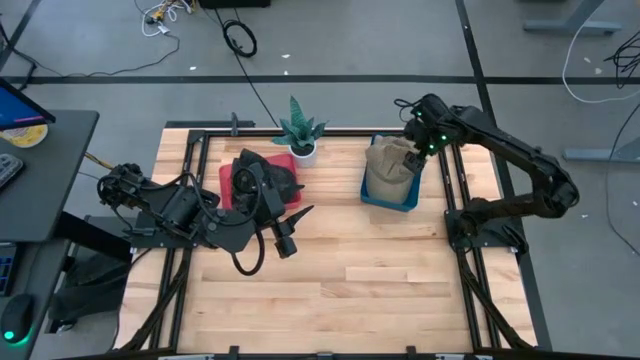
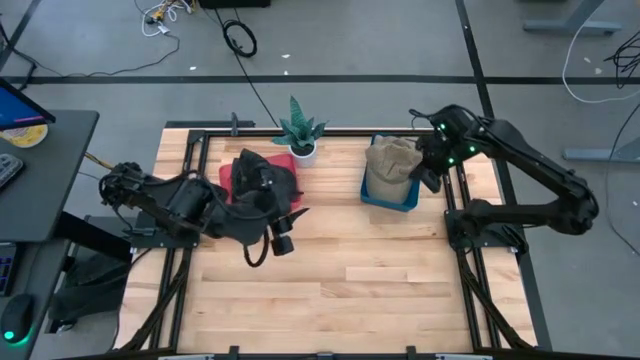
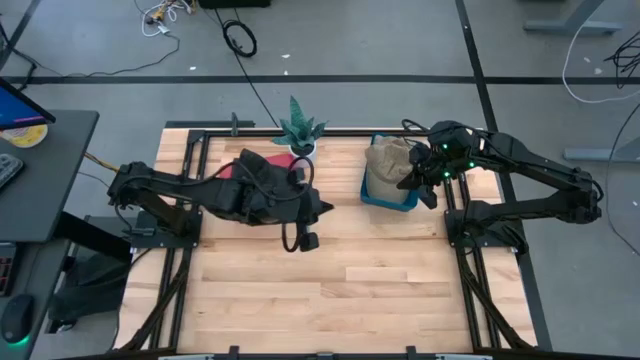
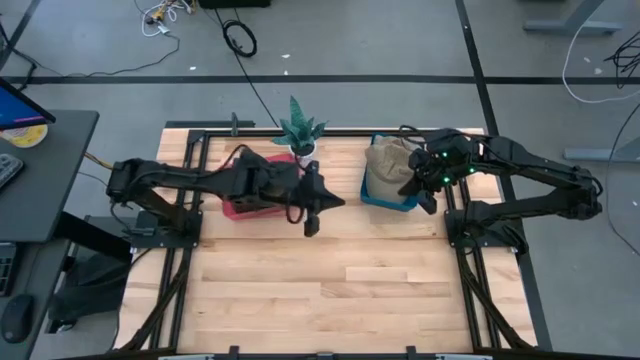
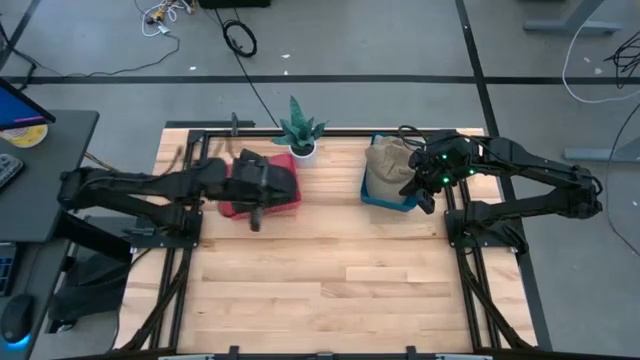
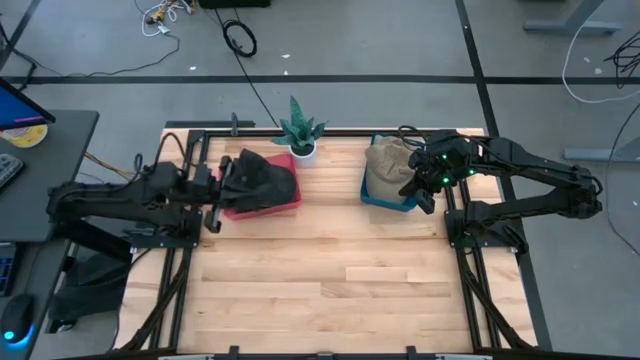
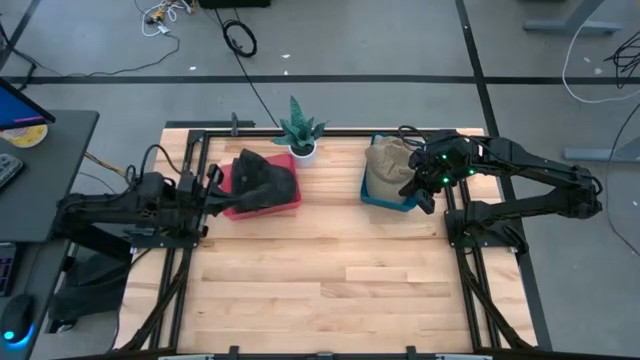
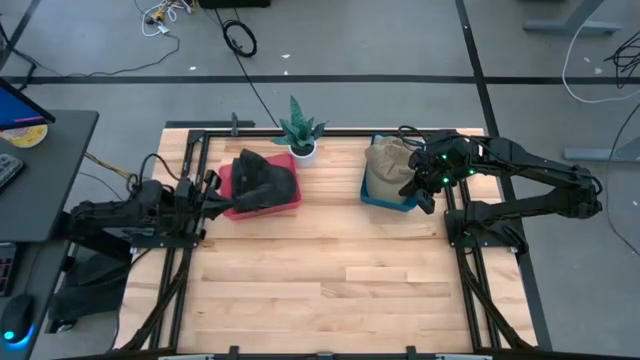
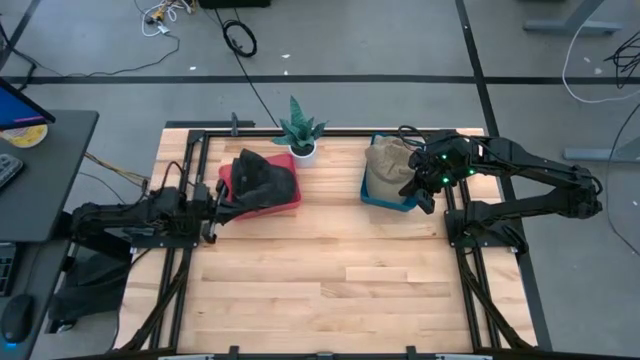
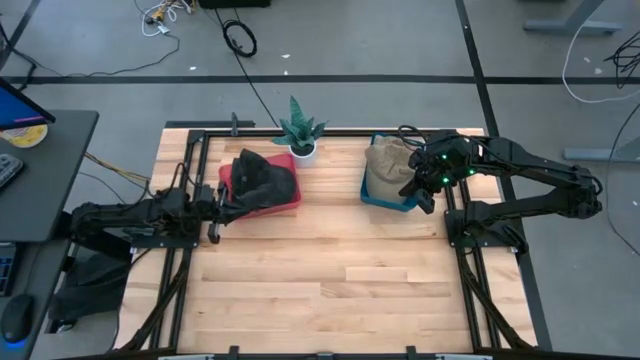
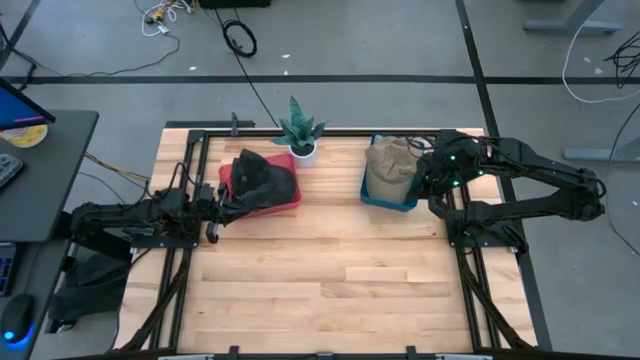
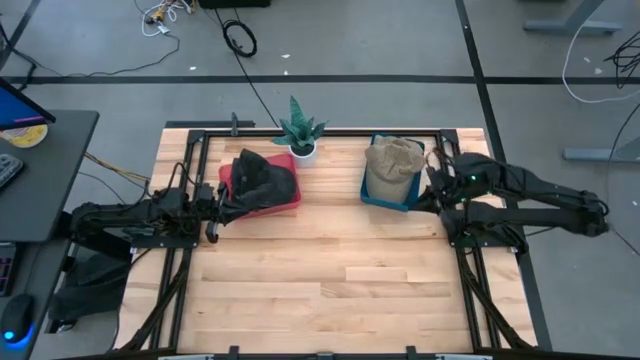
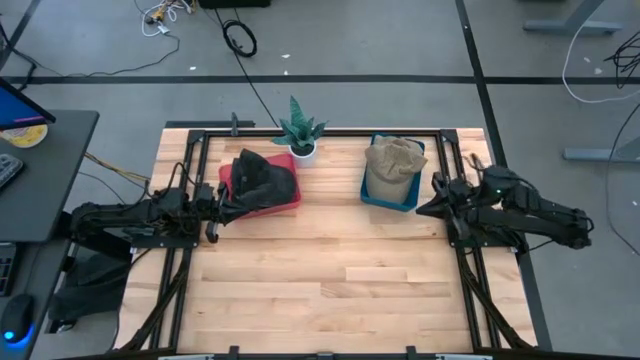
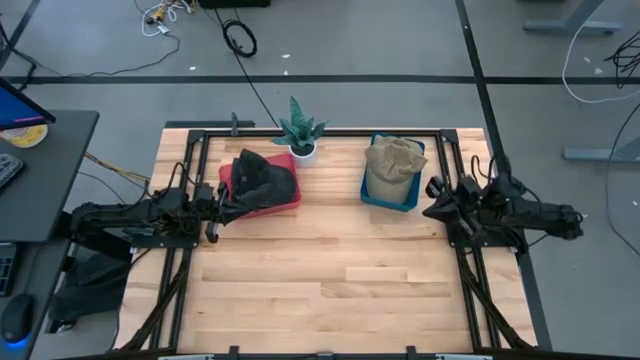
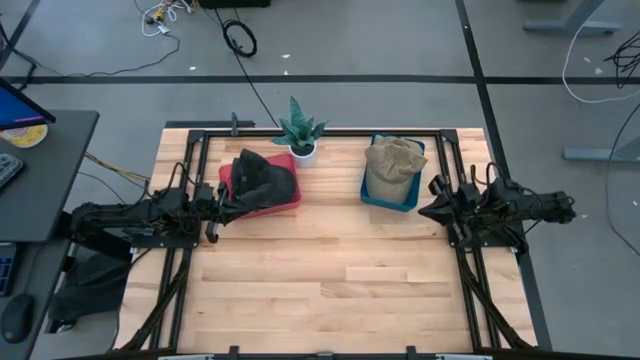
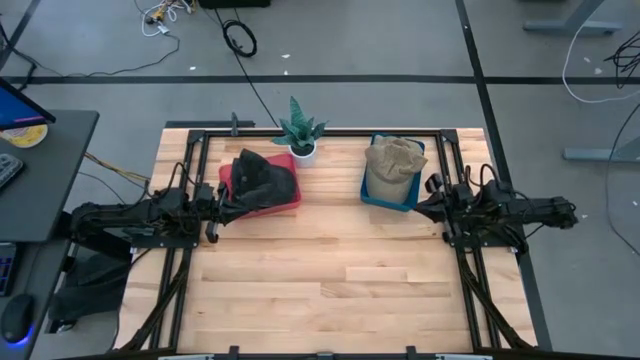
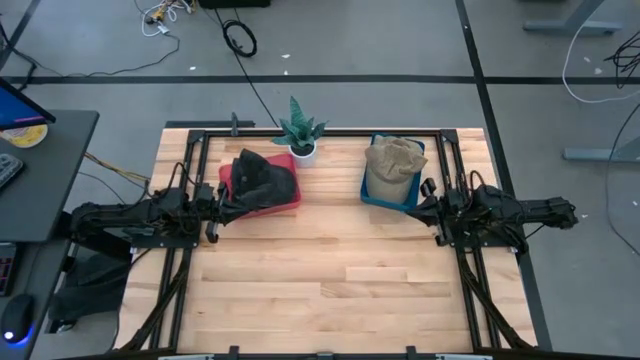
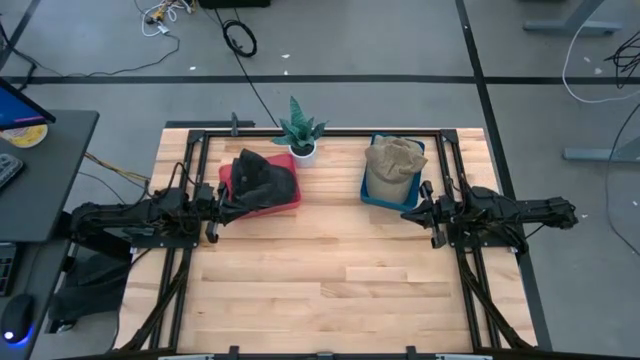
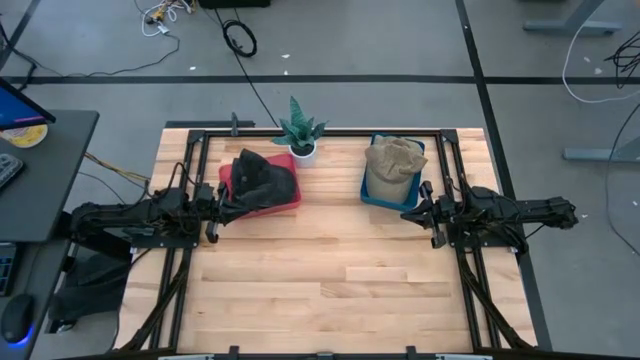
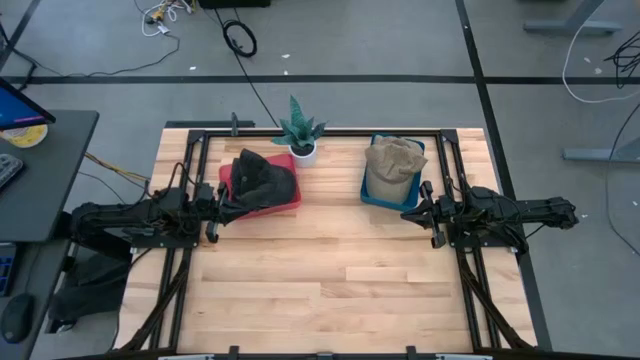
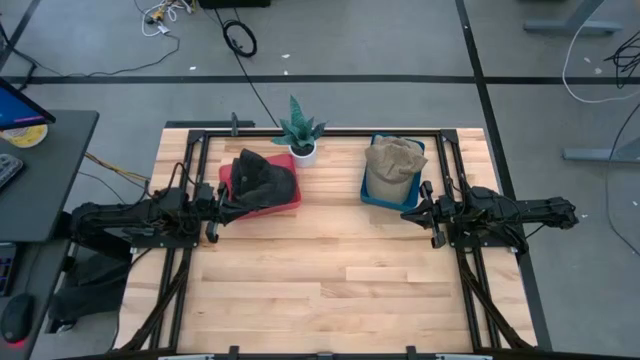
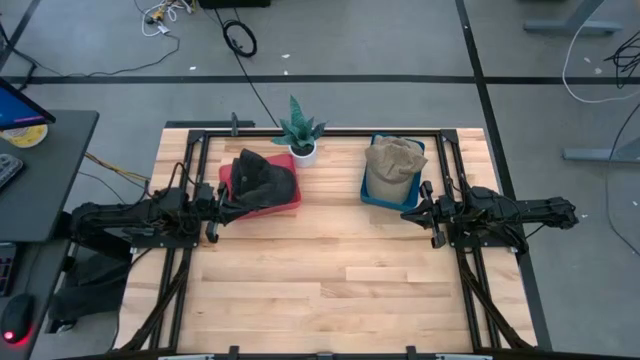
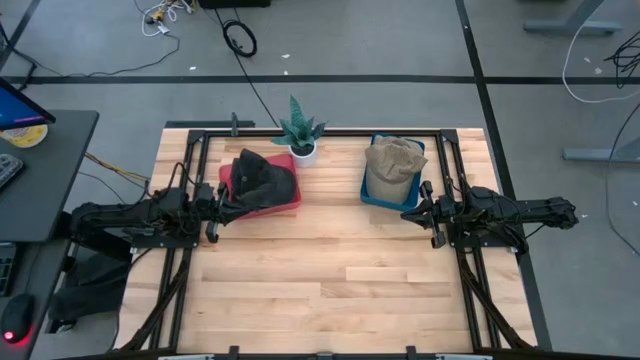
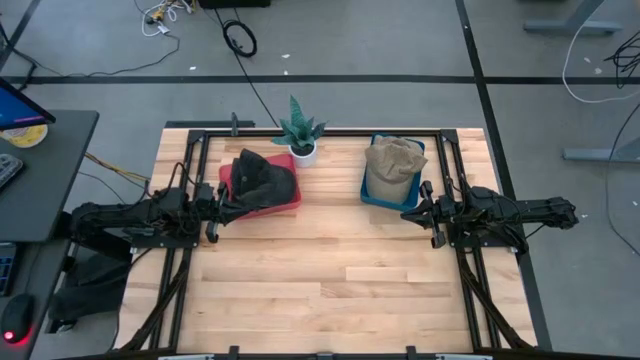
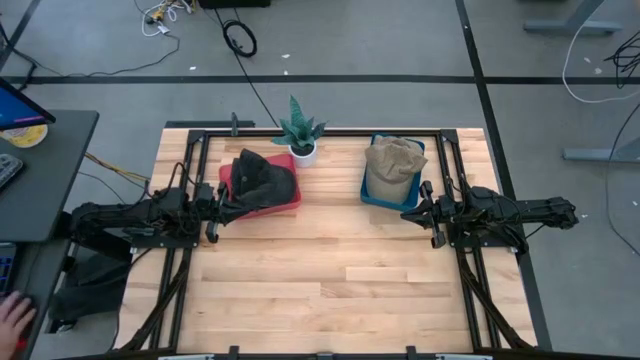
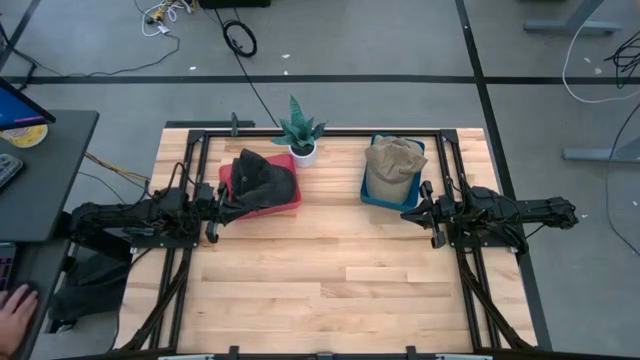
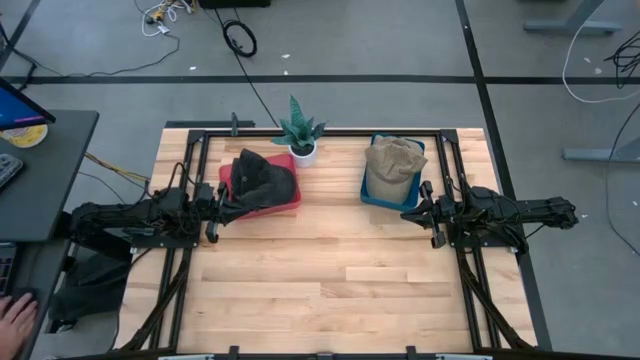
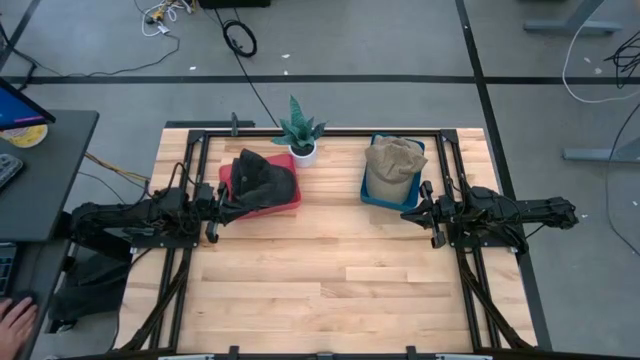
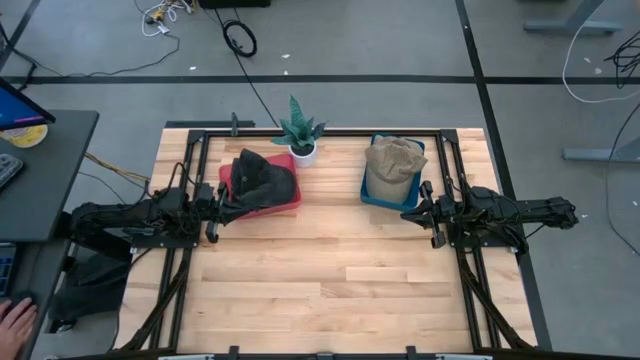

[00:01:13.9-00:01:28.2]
Task: Pick & Place hat
Return to Home Position

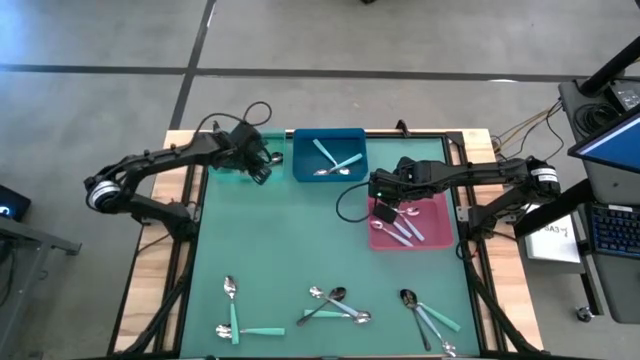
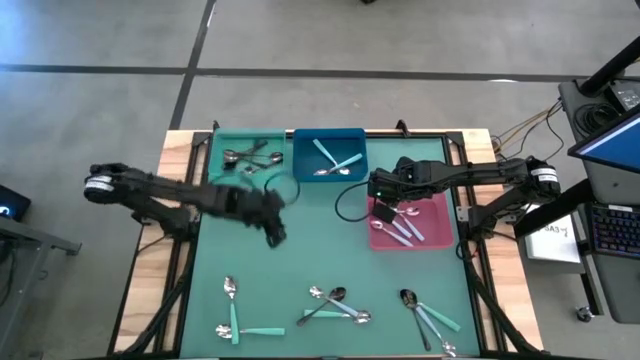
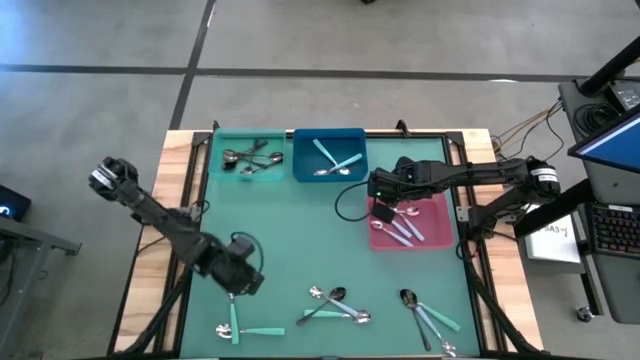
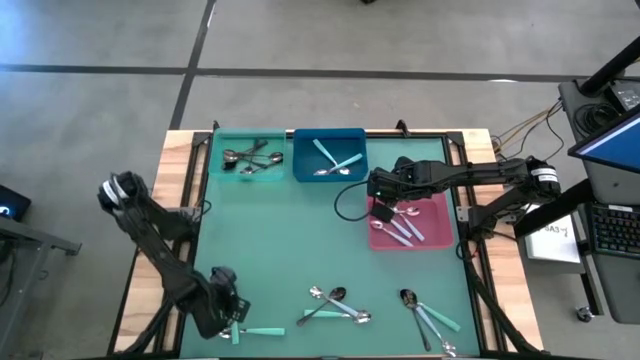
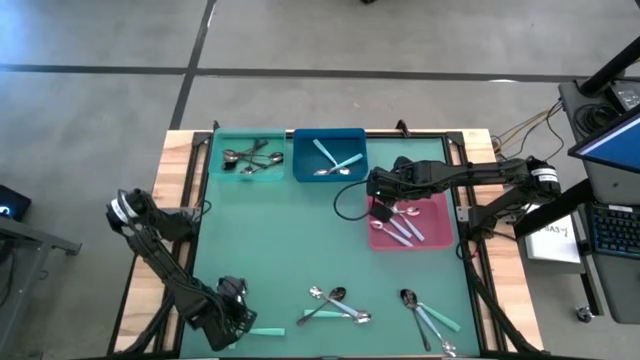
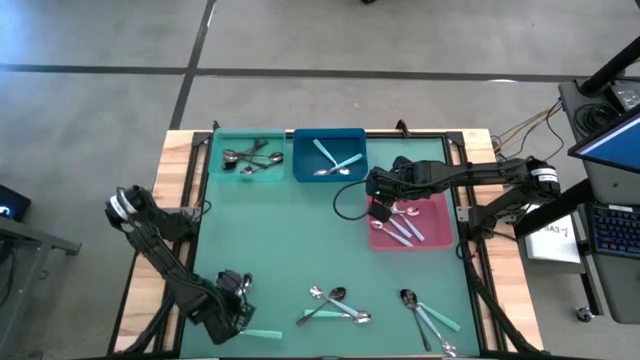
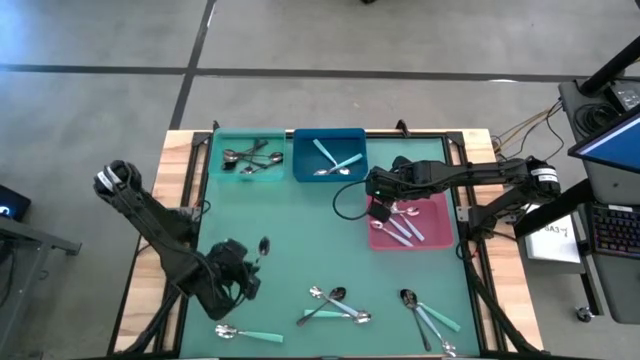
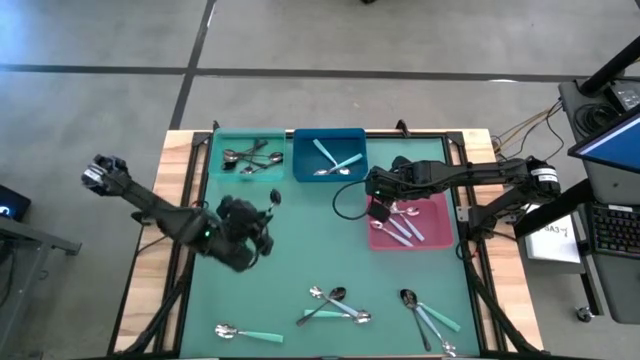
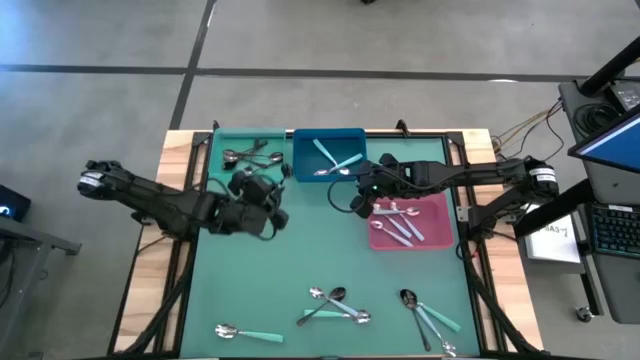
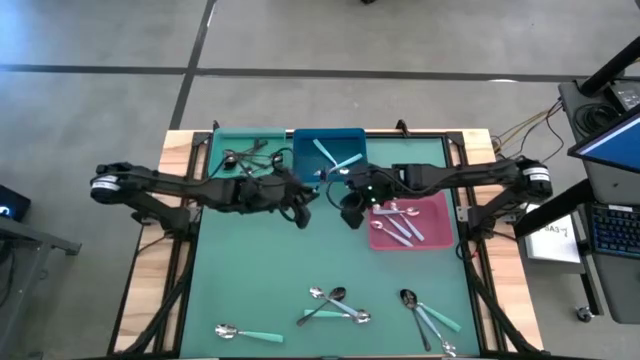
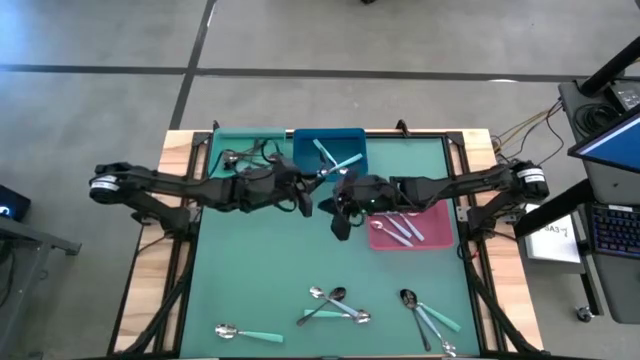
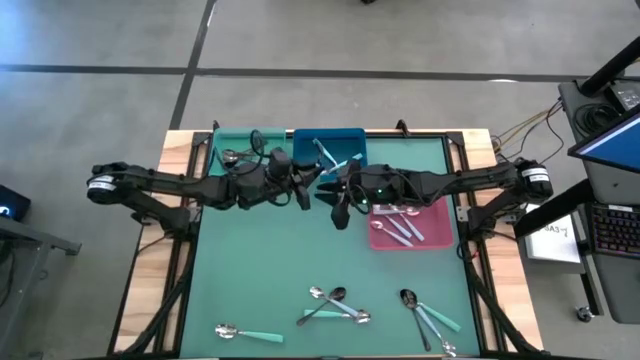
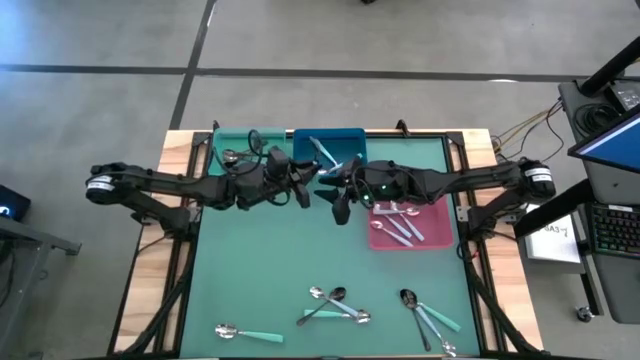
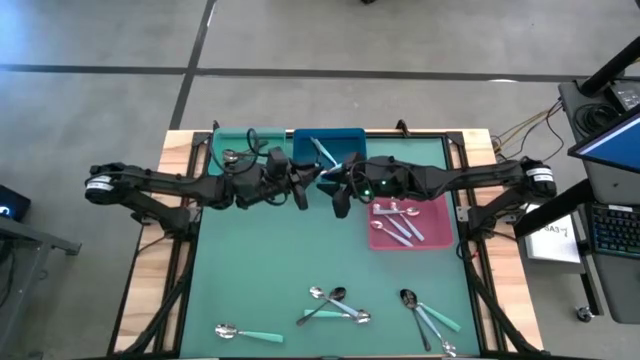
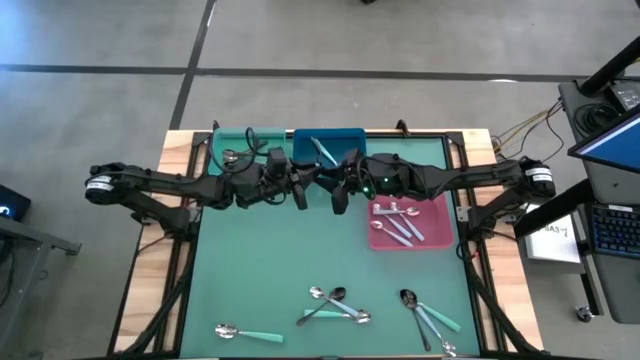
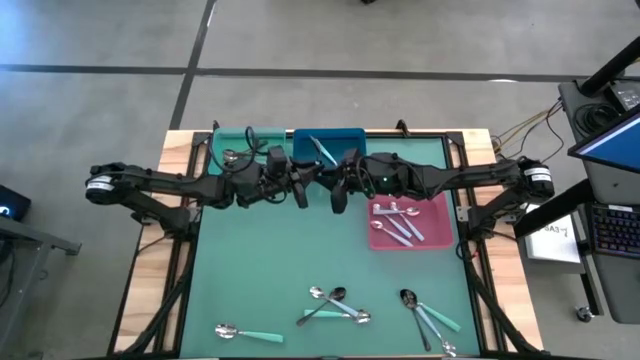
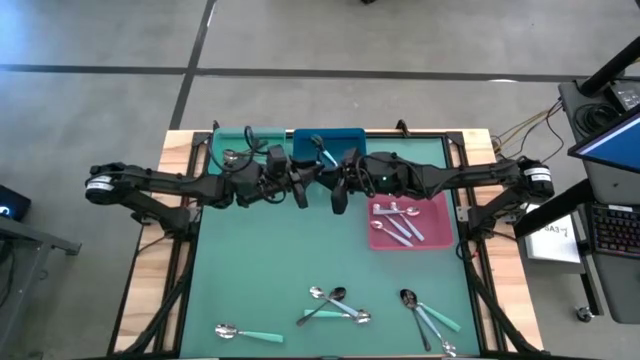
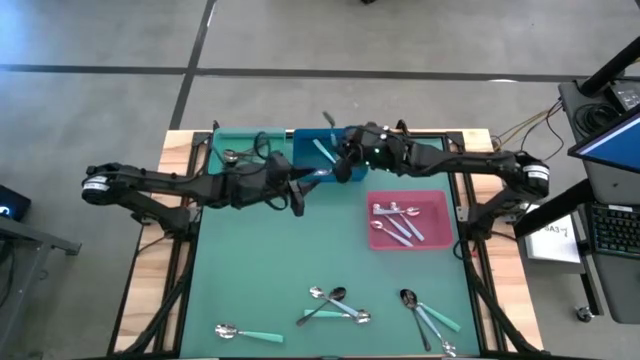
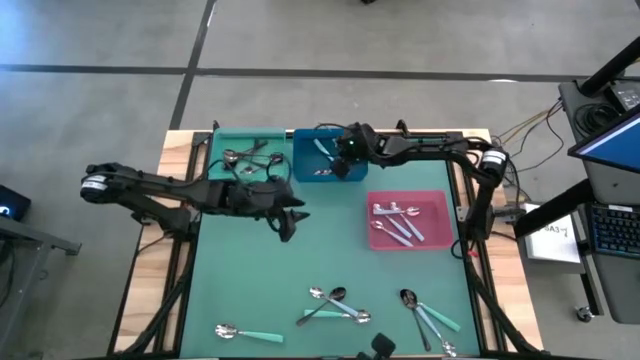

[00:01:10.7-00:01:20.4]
Task: Sort silverware by color (type)
Put the green spoon into the blue bin
